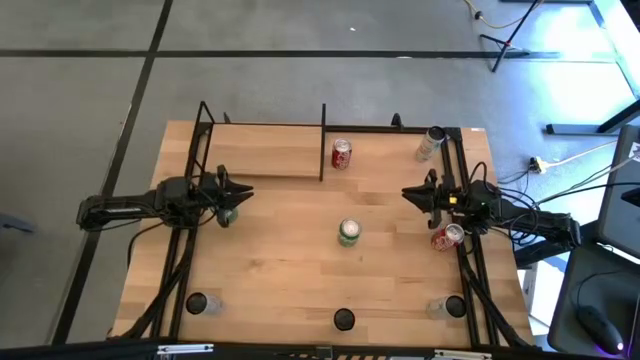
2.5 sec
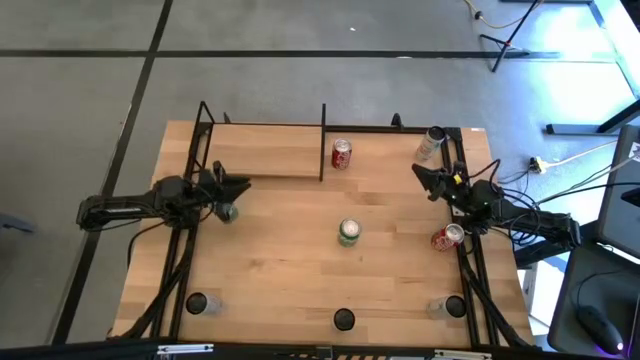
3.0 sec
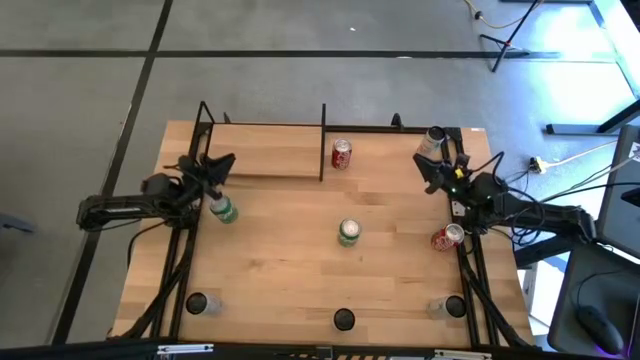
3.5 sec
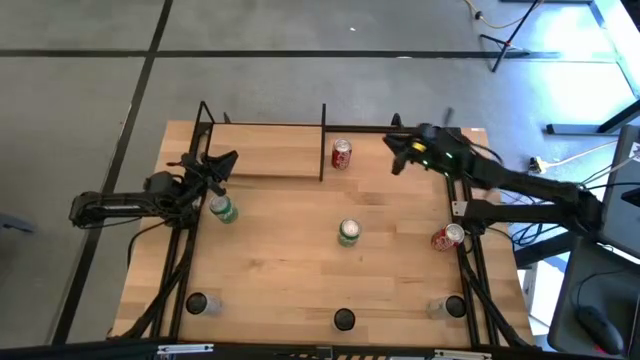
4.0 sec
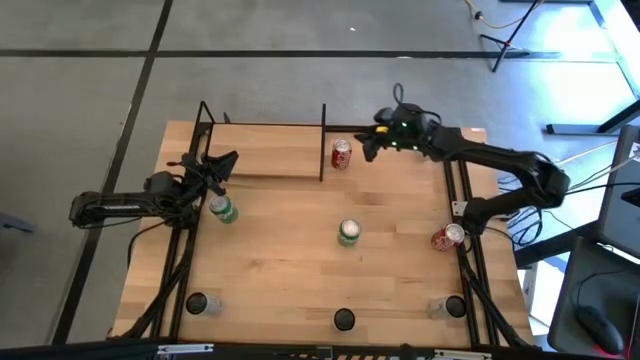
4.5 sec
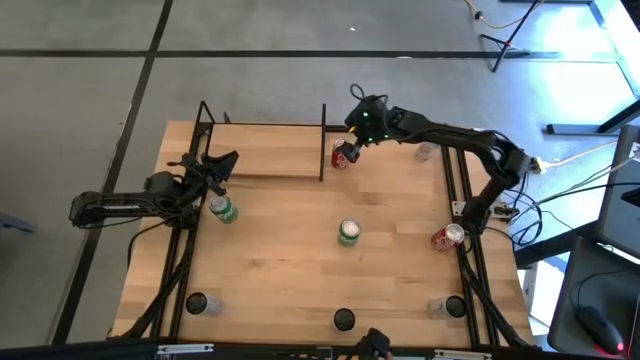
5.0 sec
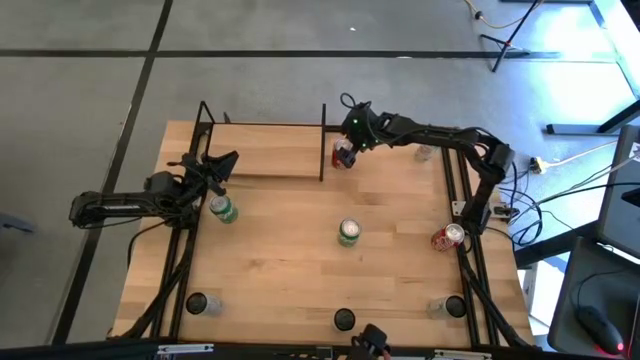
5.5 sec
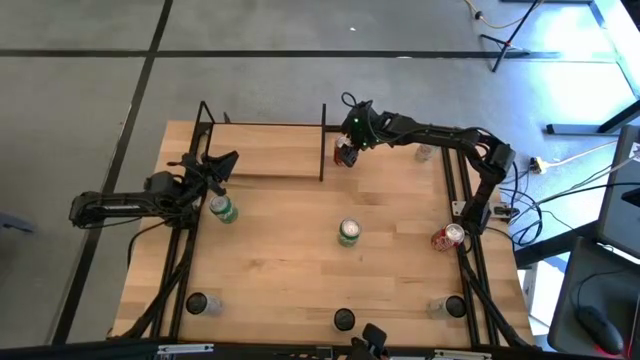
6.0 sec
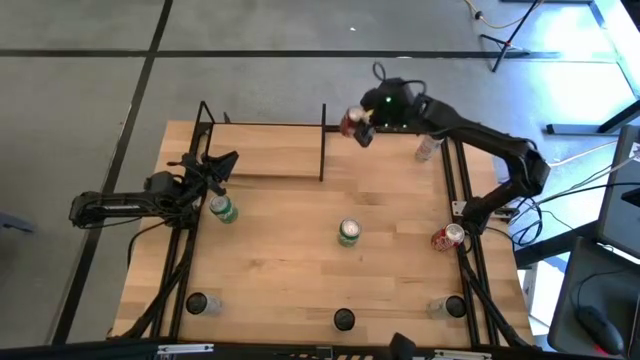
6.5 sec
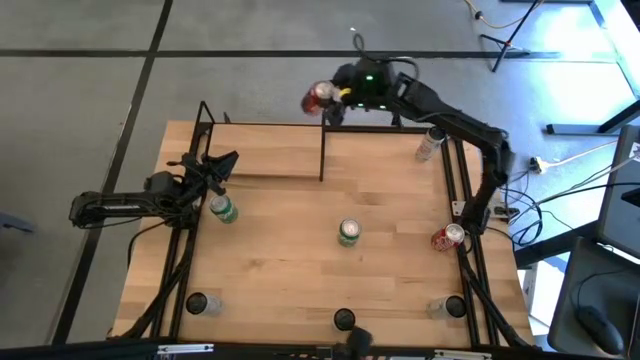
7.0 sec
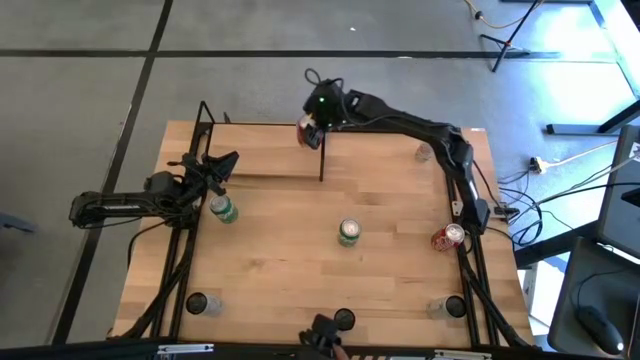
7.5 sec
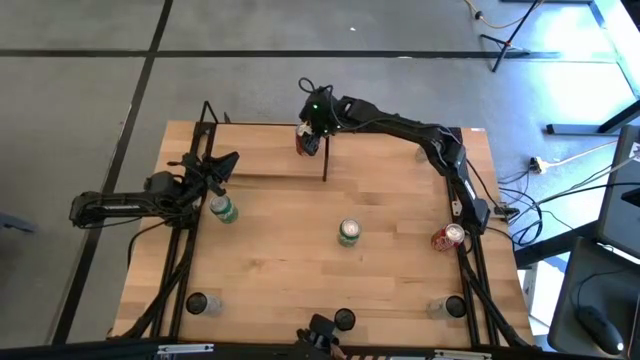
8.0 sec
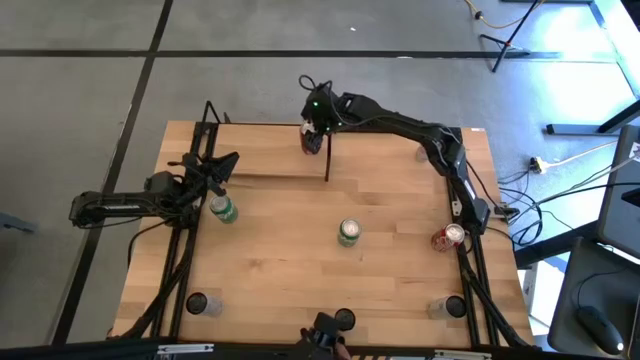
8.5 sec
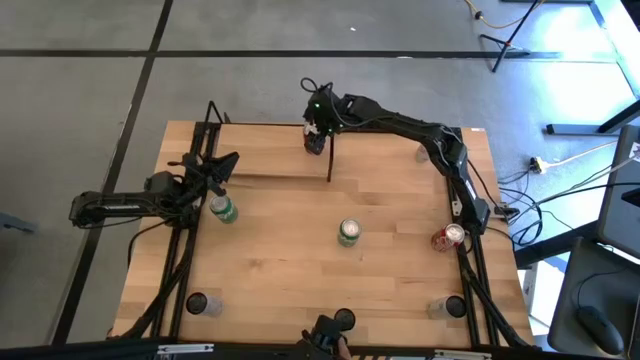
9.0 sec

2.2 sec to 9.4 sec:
Task: Place canned beverage on shelf
Put the top red soda can on the shelf

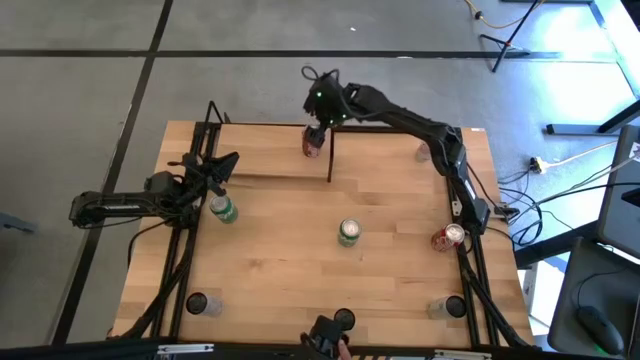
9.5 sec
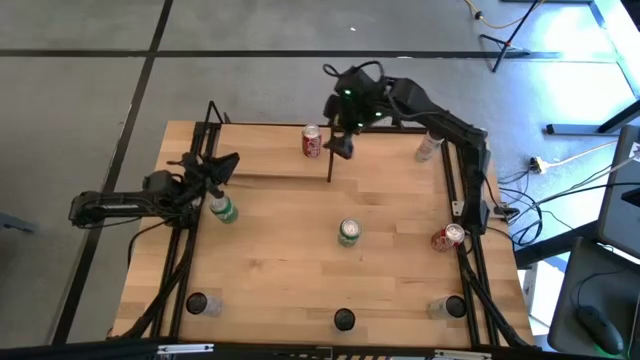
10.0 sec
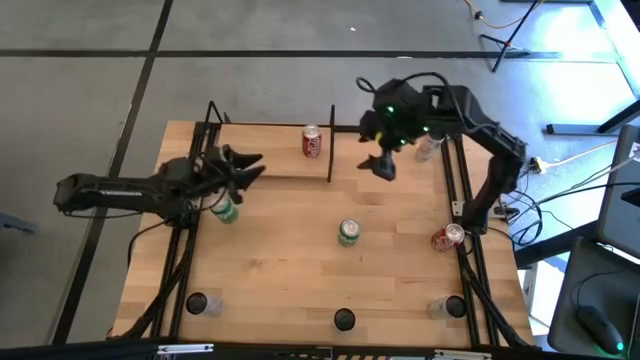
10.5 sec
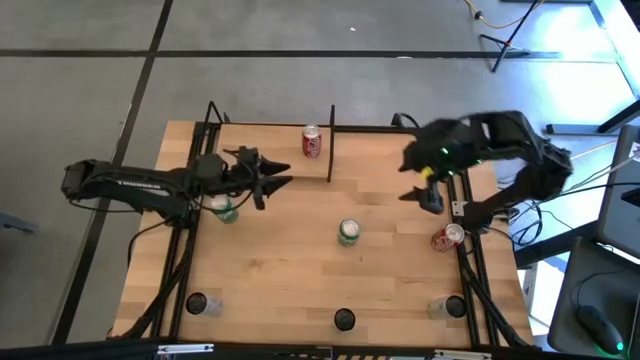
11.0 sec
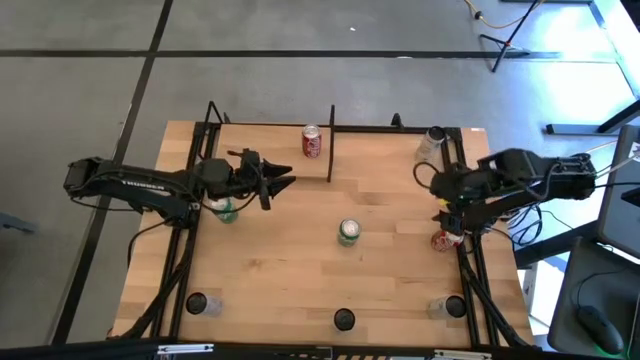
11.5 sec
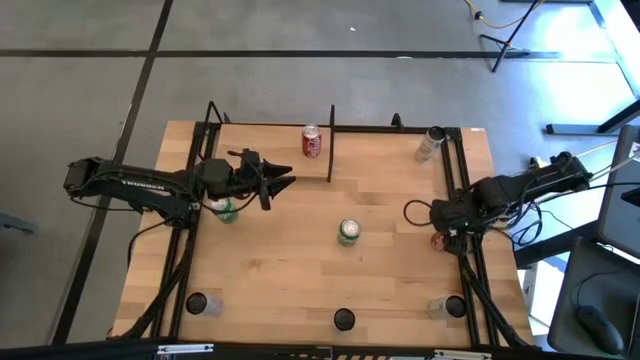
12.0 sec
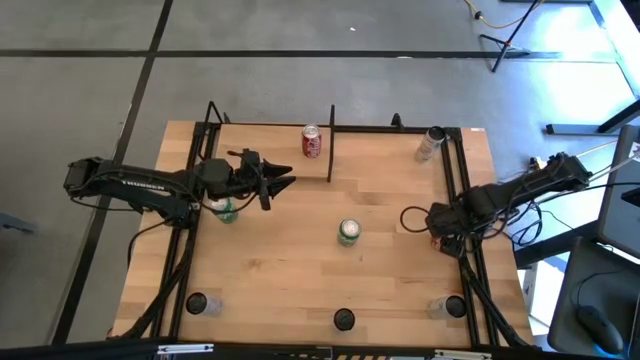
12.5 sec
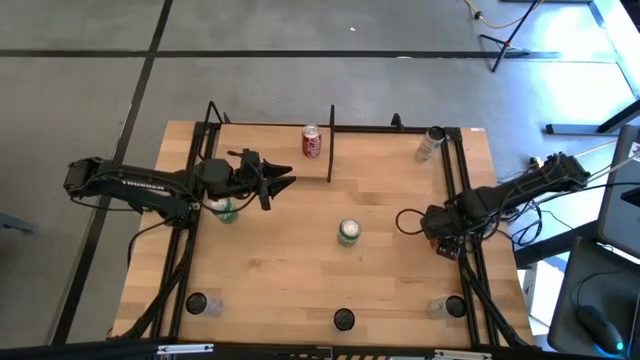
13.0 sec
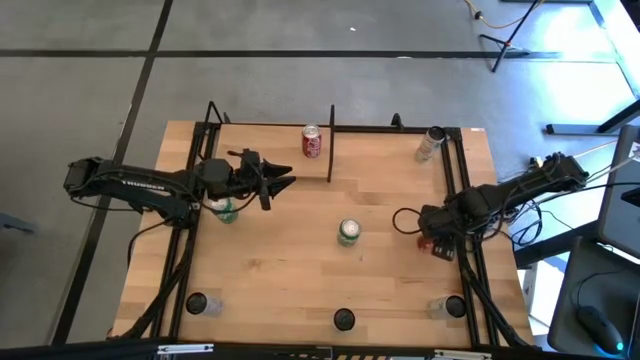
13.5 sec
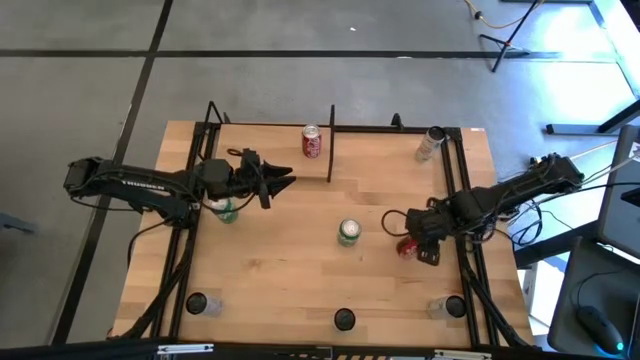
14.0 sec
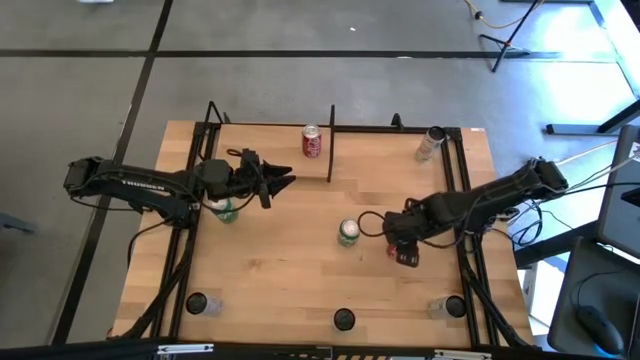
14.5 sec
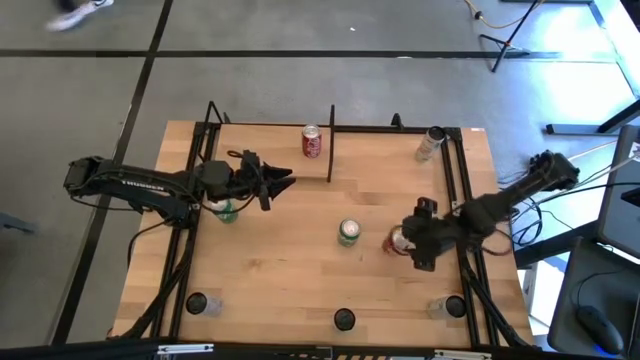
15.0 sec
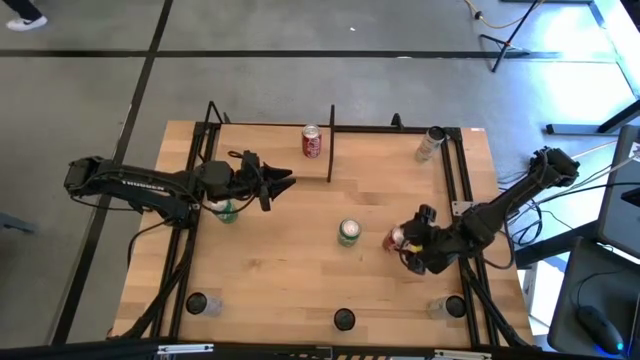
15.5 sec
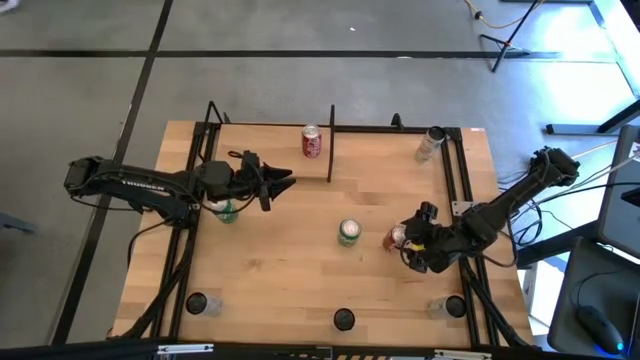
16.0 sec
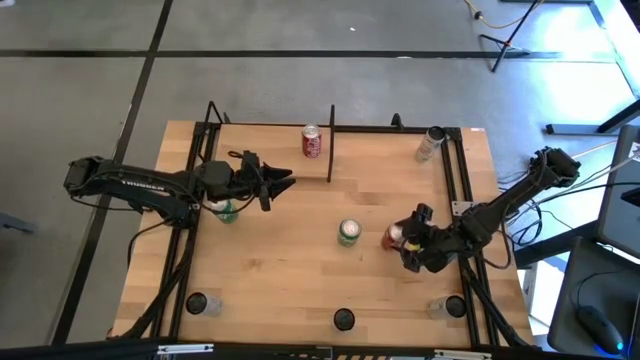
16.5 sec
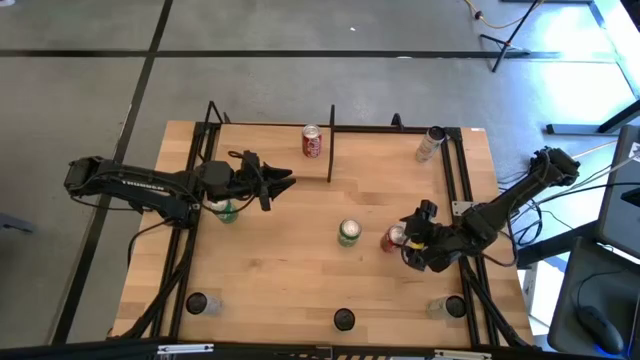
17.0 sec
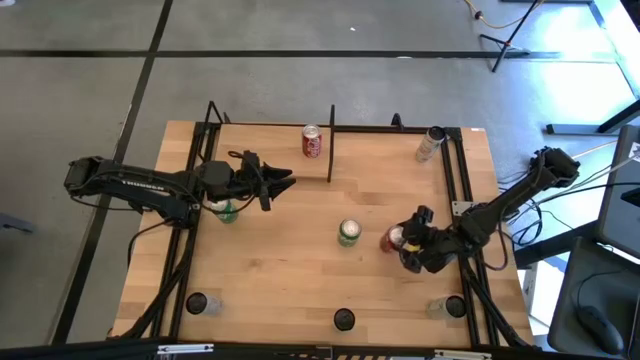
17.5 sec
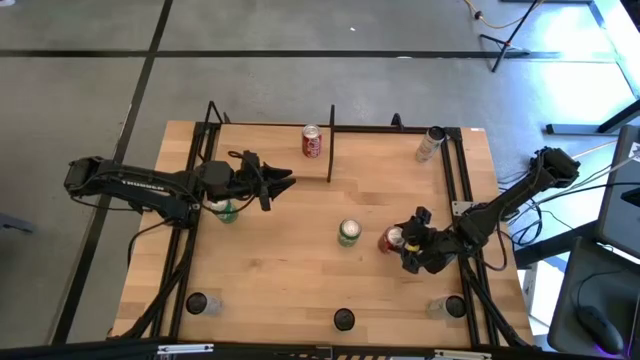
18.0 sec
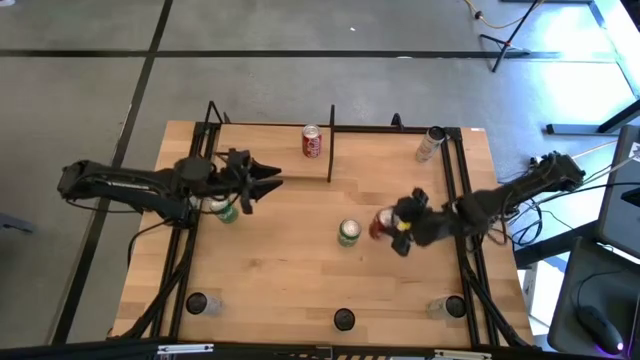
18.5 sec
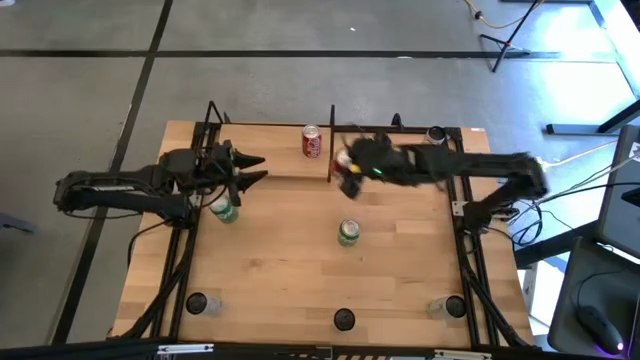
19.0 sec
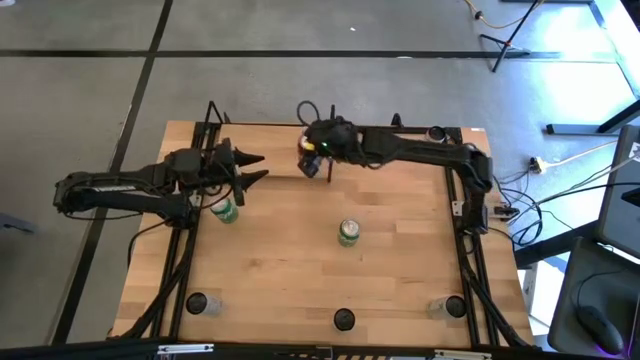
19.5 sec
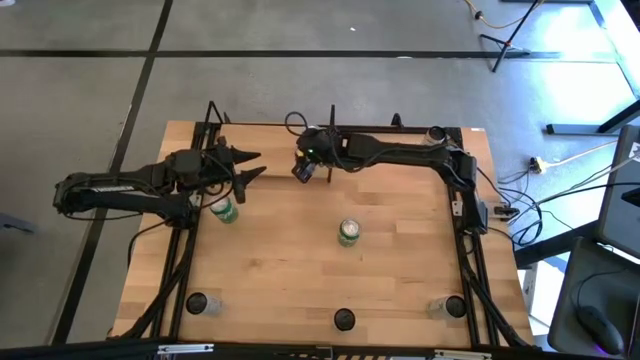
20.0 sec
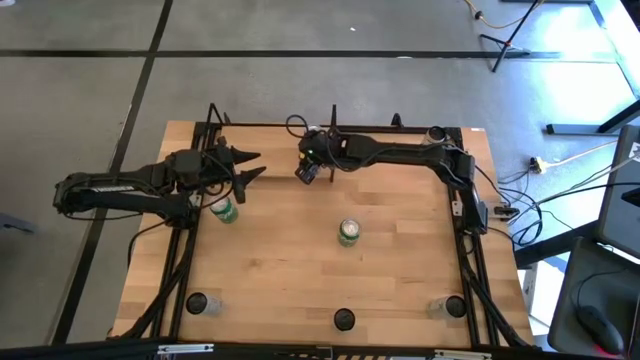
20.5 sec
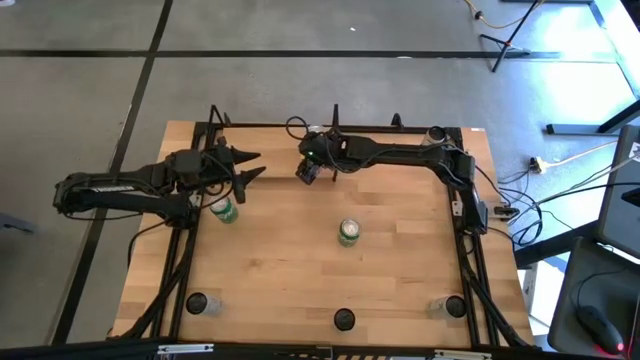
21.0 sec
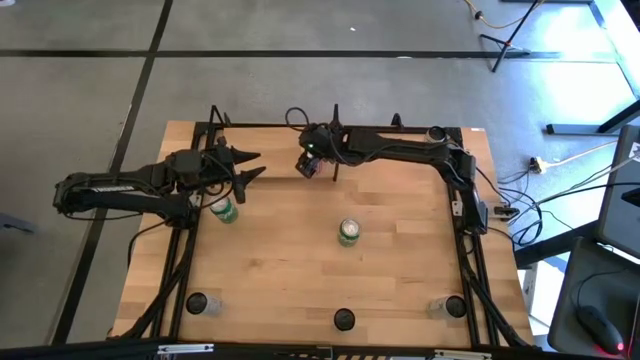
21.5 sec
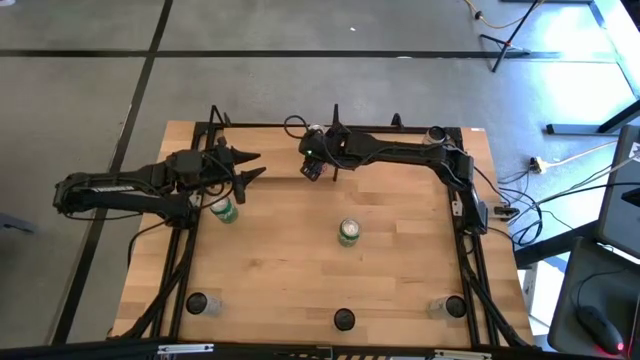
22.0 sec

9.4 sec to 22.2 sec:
Put the red soda can on the shelf aligned with the other red soda can
